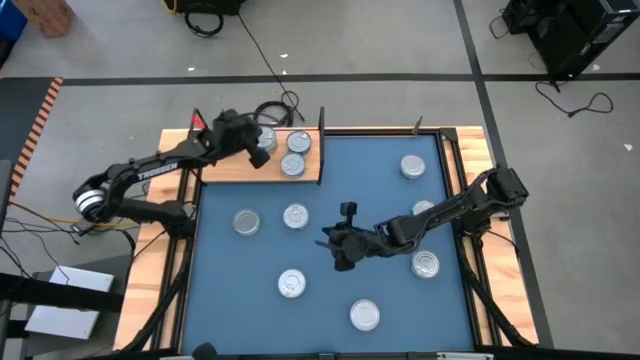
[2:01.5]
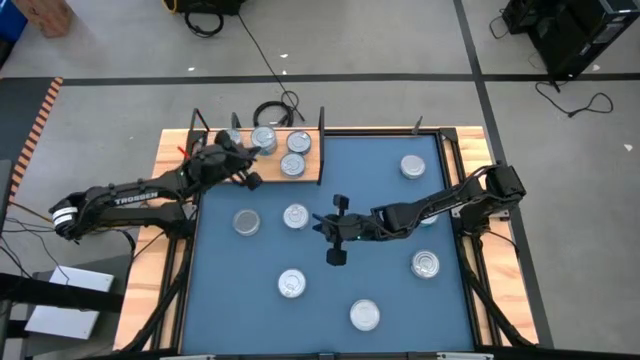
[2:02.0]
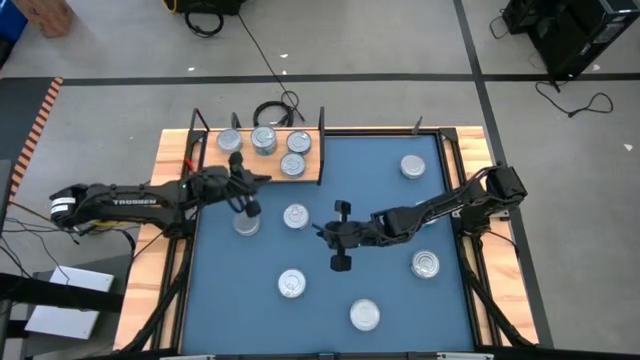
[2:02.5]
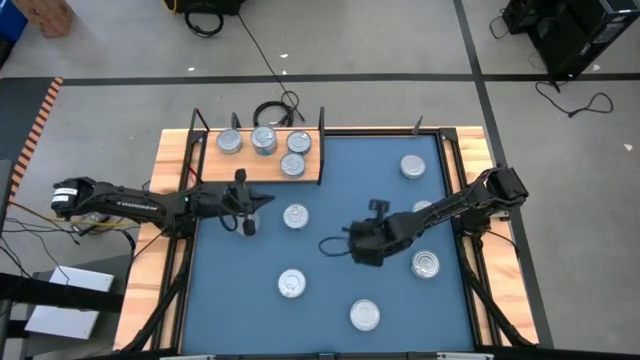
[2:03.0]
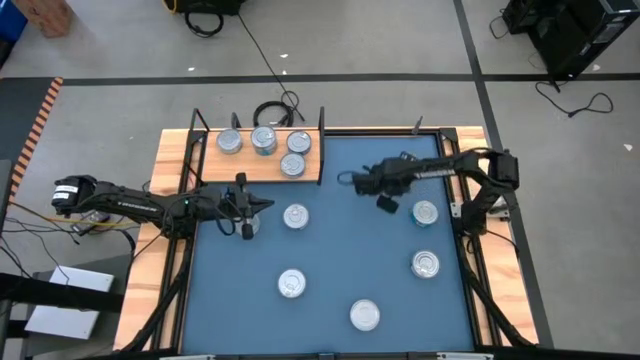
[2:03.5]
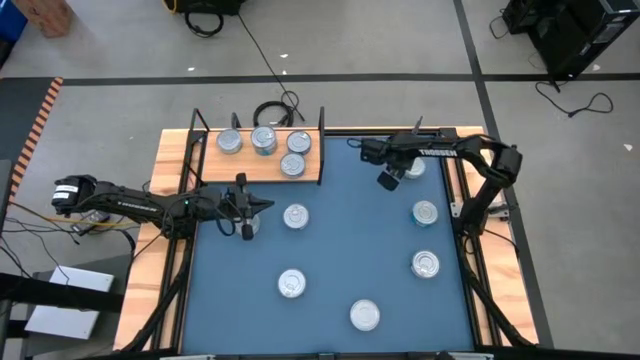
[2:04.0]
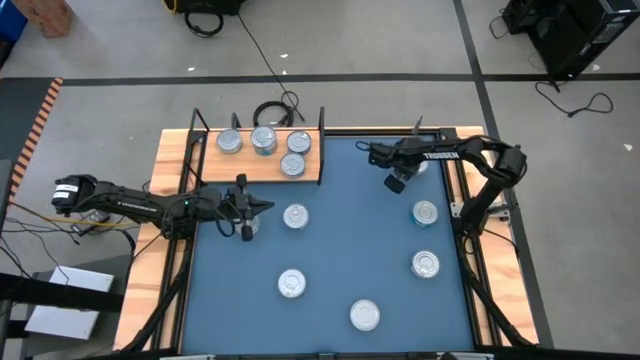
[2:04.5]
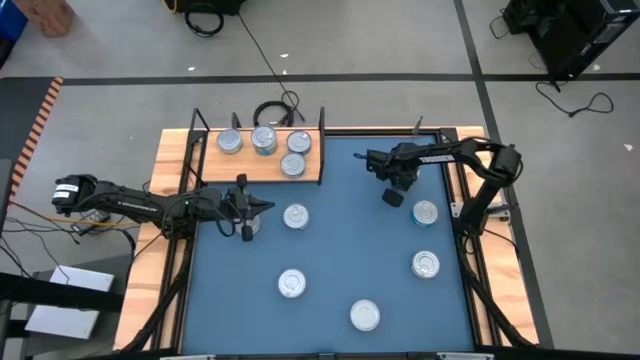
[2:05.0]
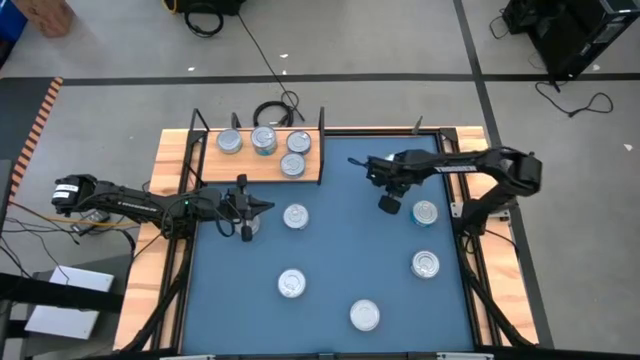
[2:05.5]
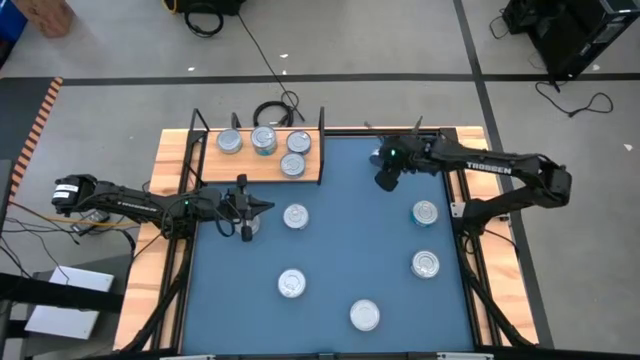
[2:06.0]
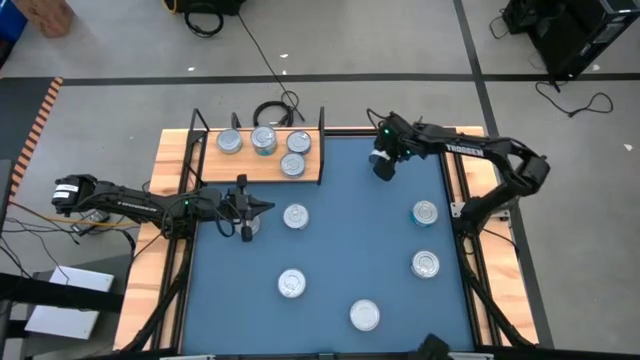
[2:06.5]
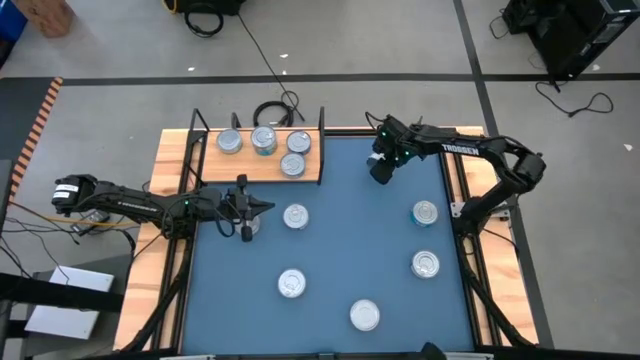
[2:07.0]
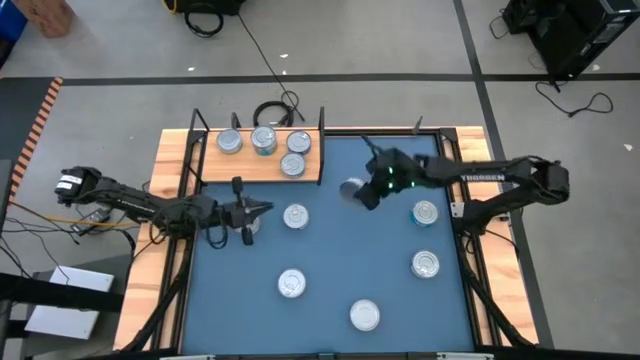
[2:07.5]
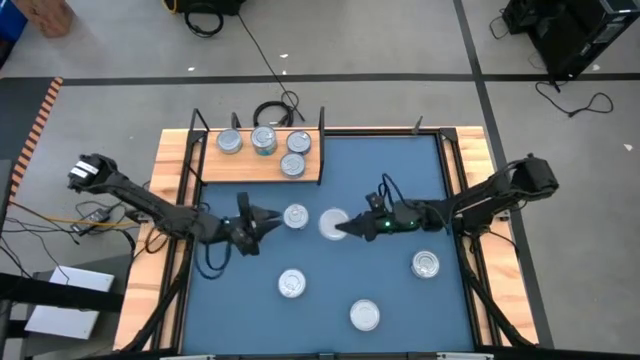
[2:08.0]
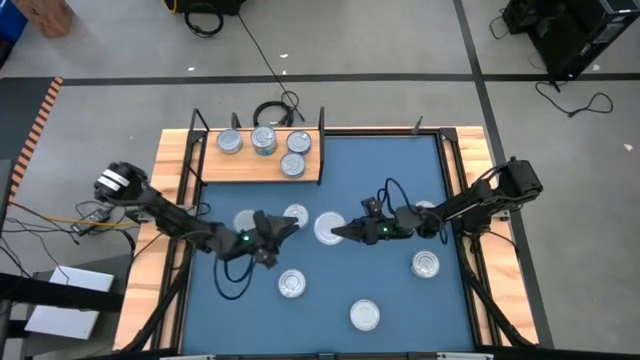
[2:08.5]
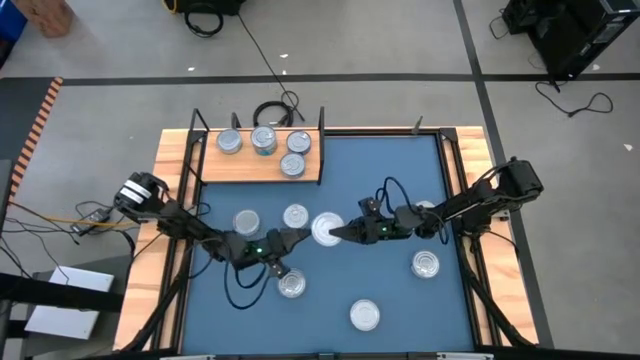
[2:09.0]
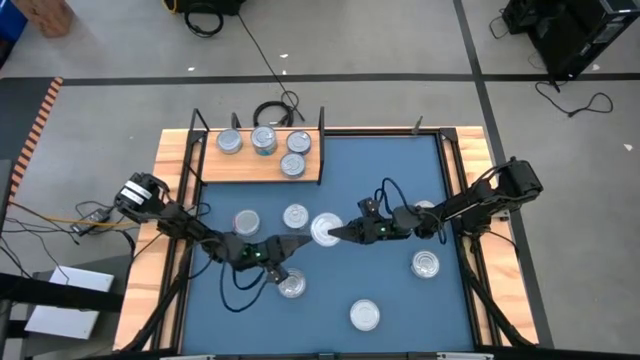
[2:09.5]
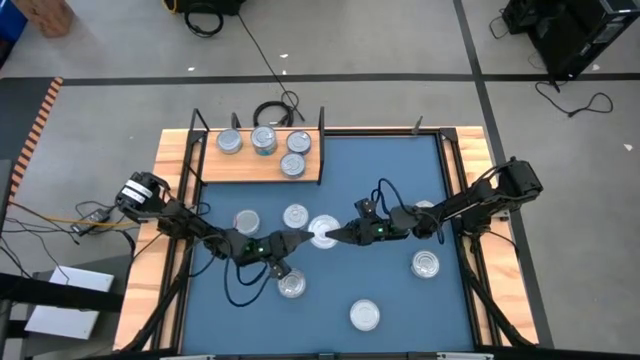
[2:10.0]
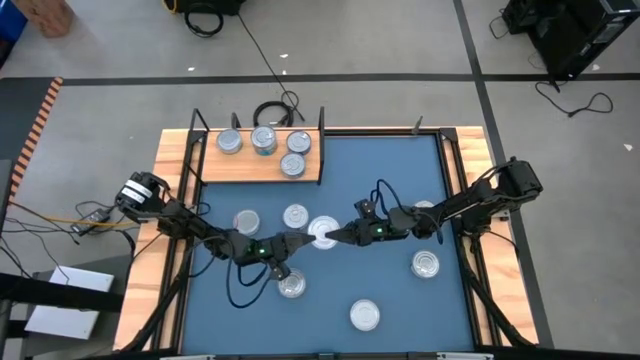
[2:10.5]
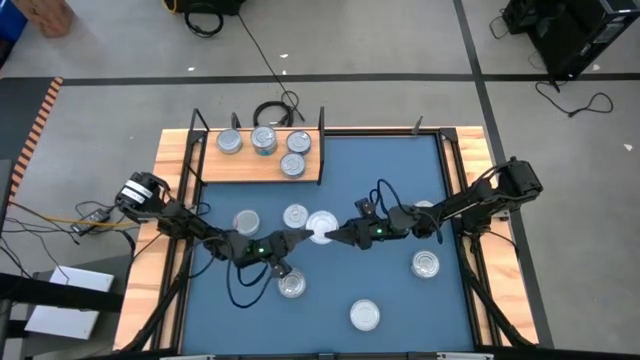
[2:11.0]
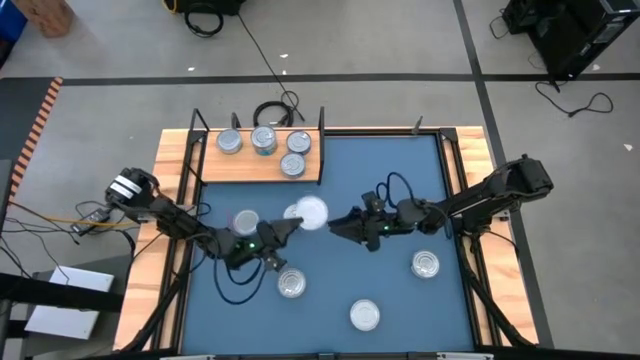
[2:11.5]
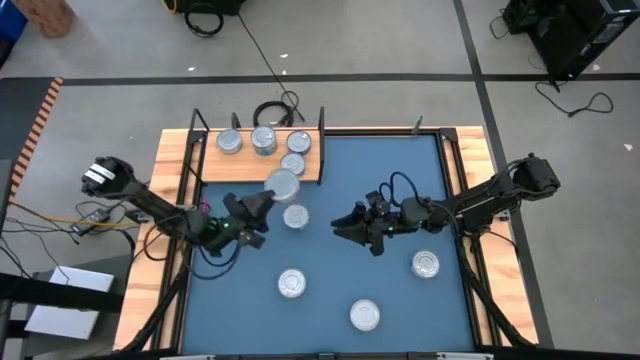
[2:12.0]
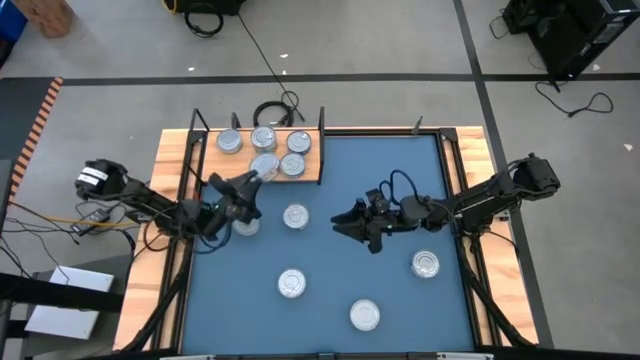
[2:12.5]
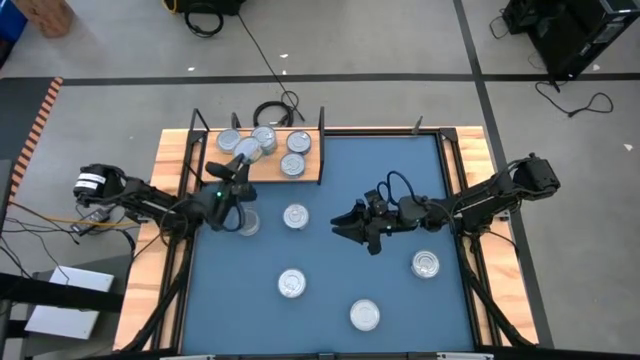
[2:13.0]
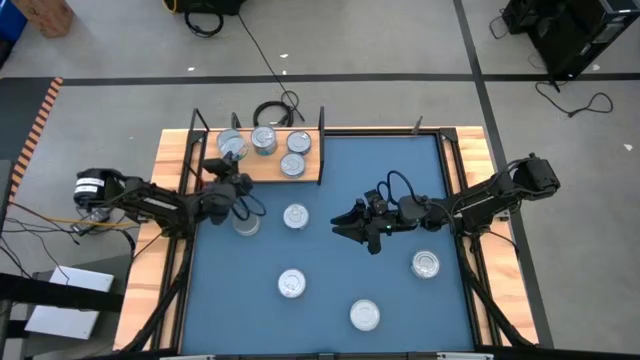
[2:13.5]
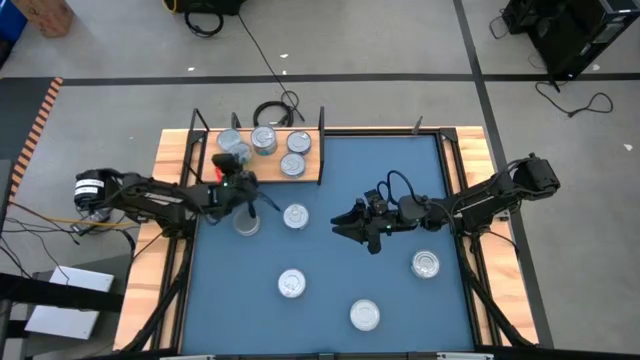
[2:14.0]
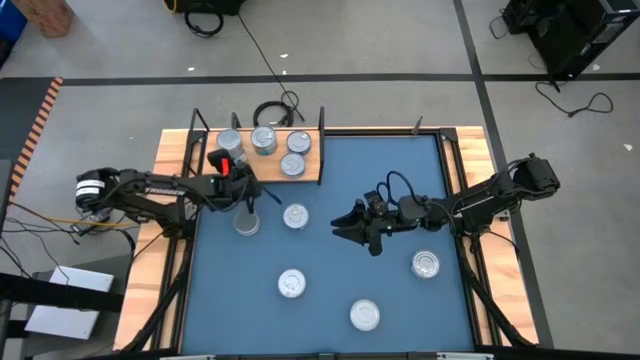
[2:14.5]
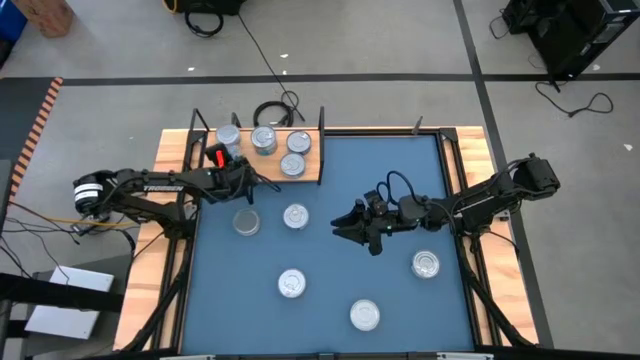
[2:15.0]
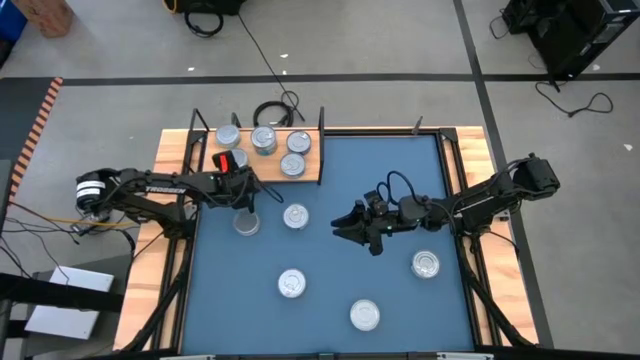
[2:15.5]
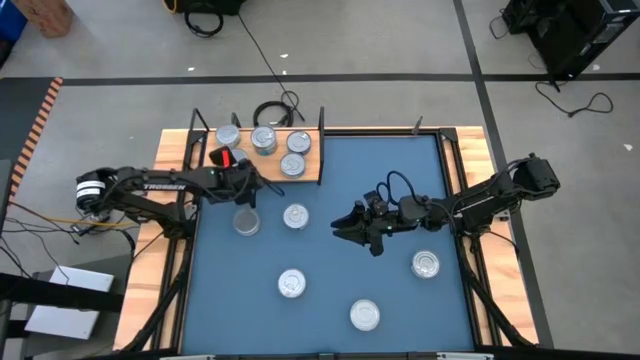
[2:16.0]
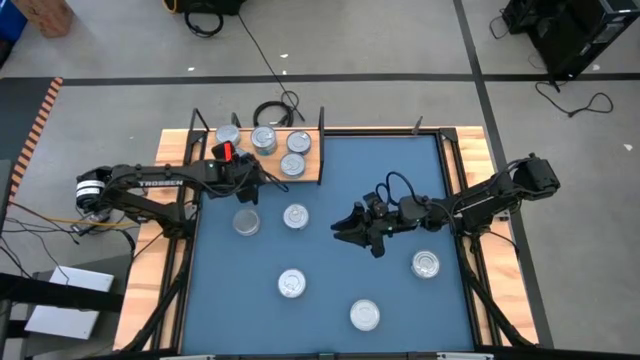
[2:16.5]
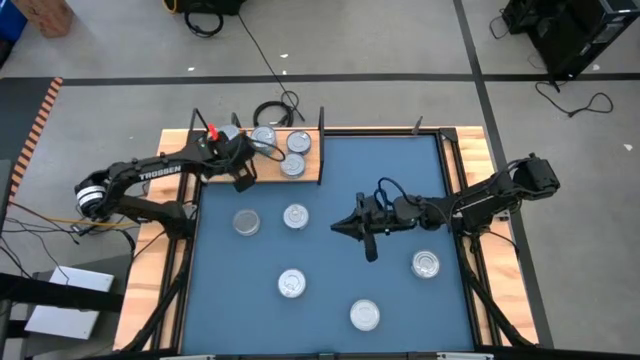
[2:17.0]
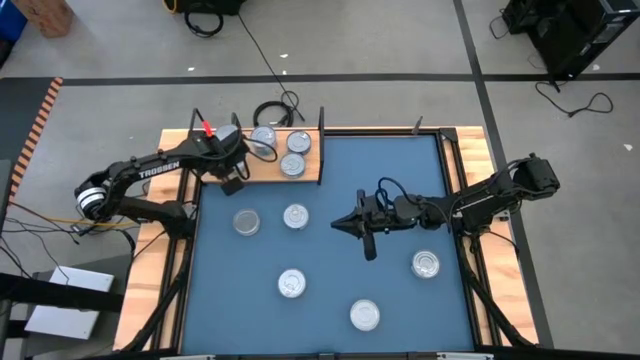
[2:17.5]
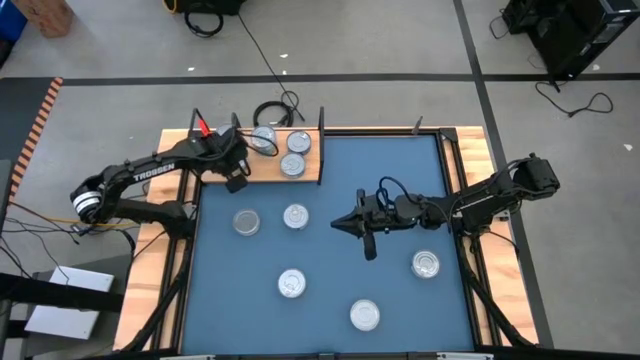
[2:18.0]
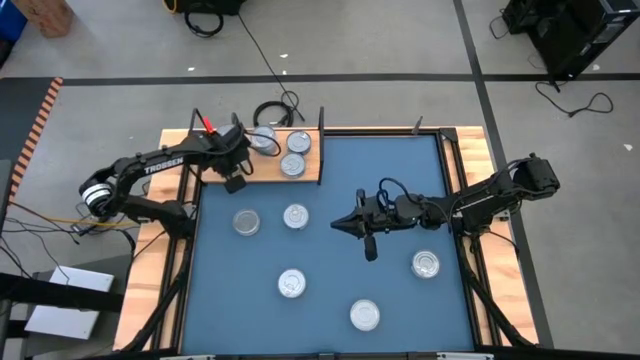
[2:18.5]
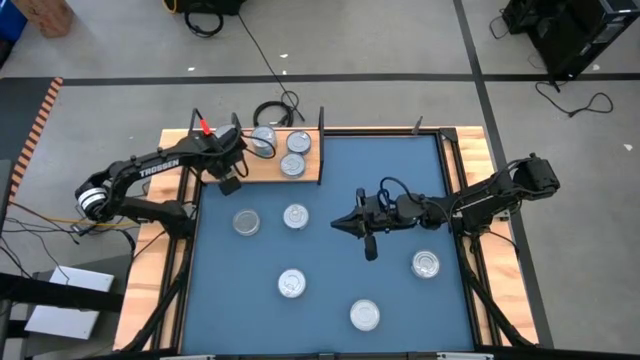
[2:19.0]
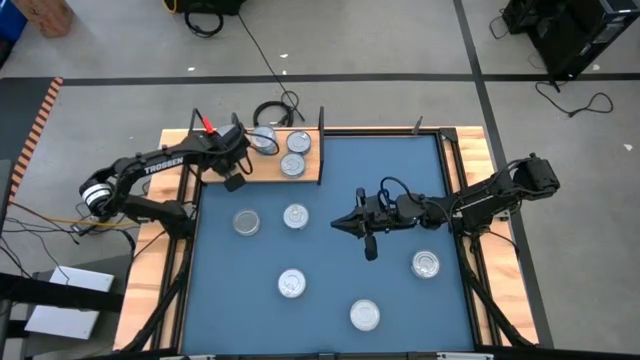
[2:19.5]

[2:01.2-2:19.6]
Task: Stack canned seafood by type on shelf
Put the green tuna can on the shelf

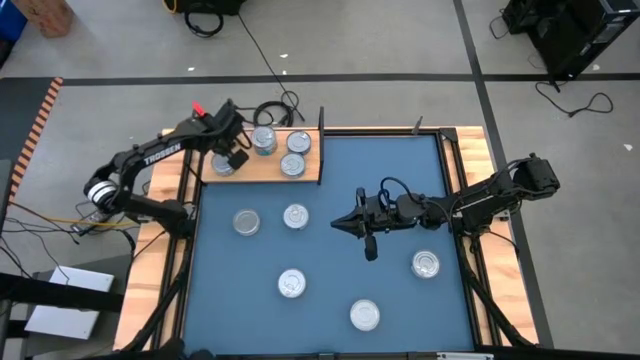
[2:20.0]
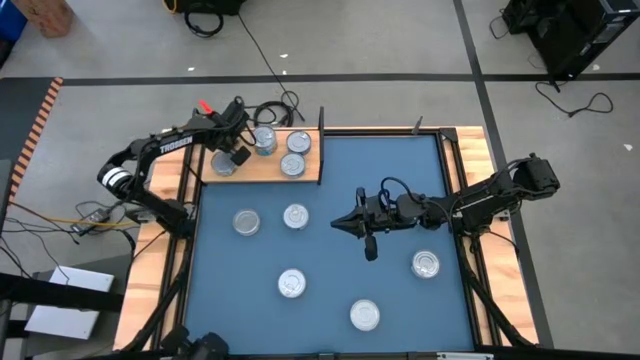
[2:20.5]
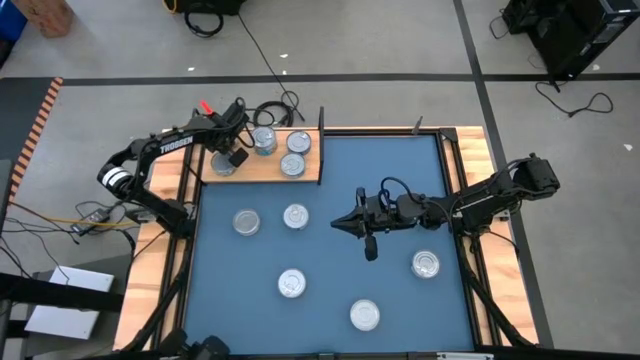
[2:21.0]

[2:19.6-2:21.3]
Adjust the green tuna can on the shelf
